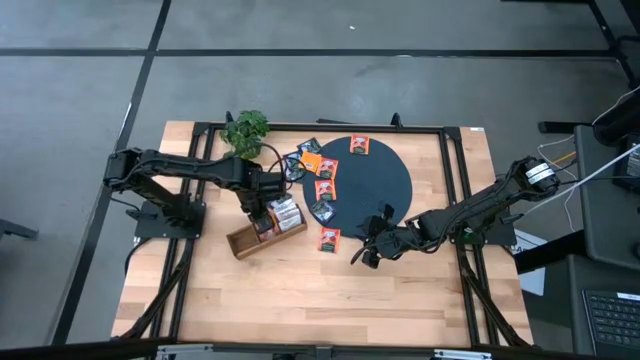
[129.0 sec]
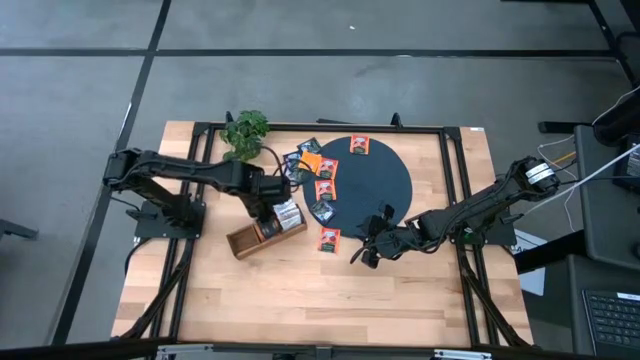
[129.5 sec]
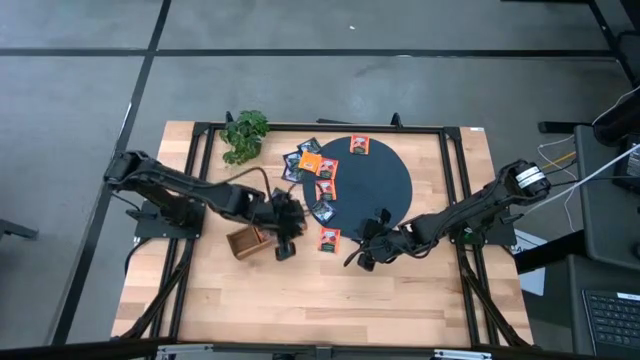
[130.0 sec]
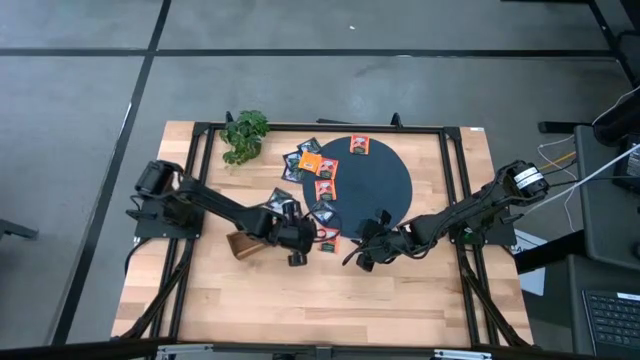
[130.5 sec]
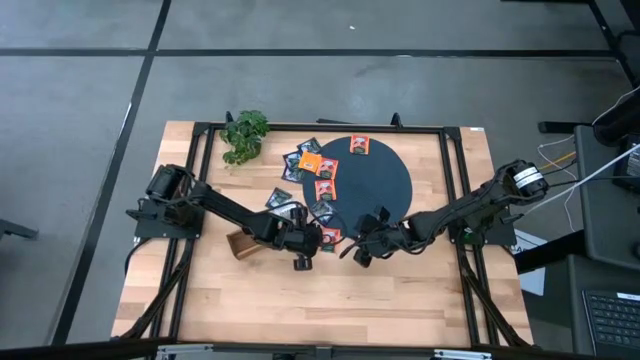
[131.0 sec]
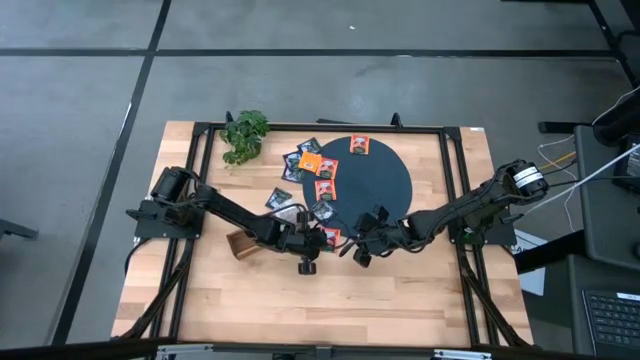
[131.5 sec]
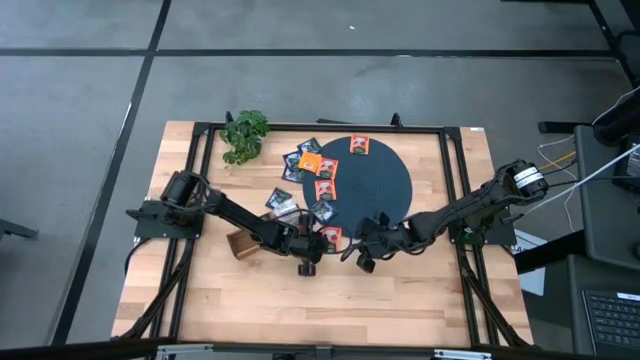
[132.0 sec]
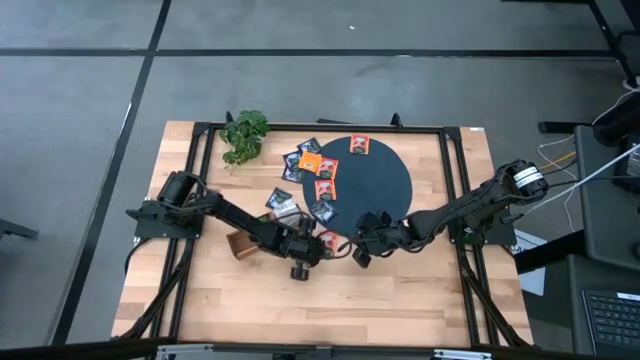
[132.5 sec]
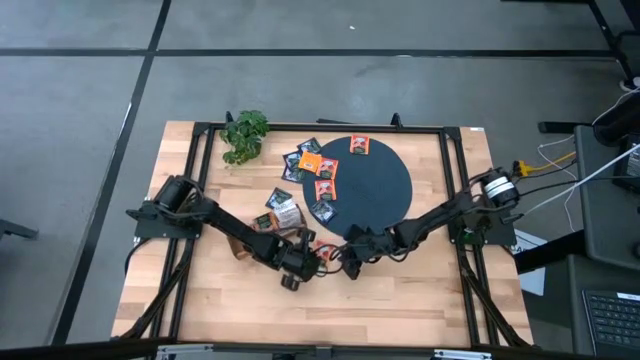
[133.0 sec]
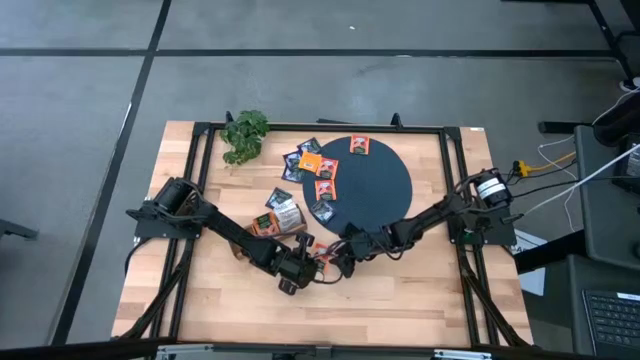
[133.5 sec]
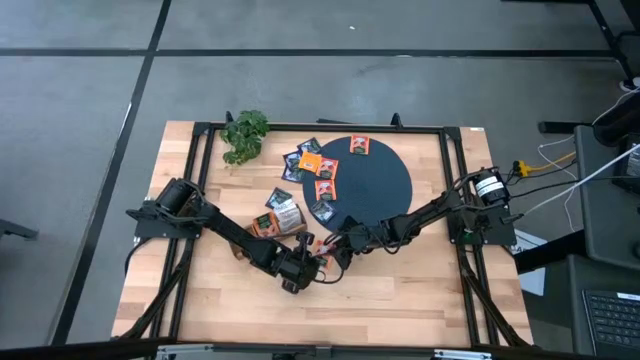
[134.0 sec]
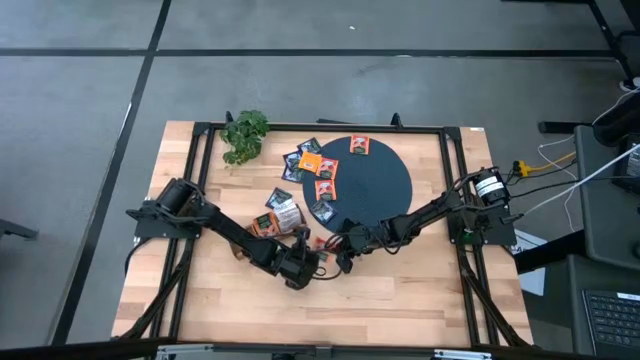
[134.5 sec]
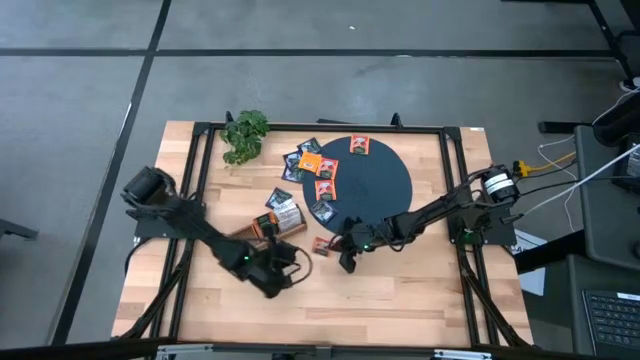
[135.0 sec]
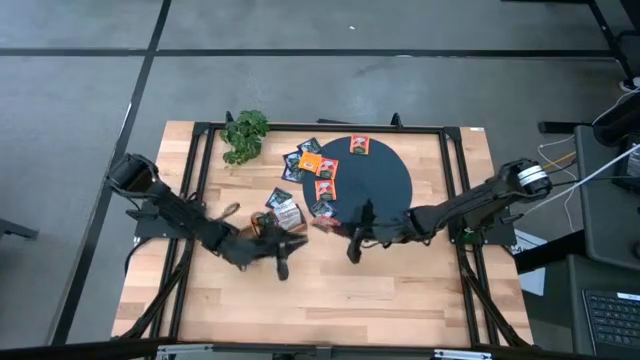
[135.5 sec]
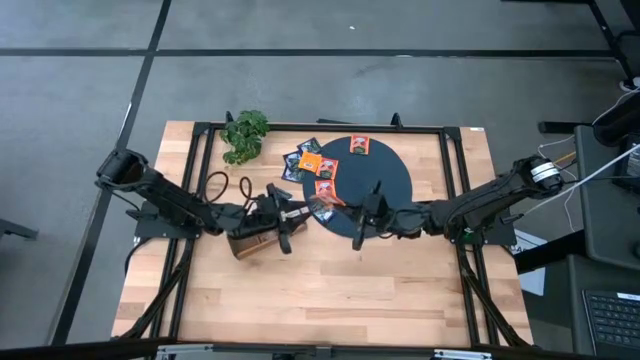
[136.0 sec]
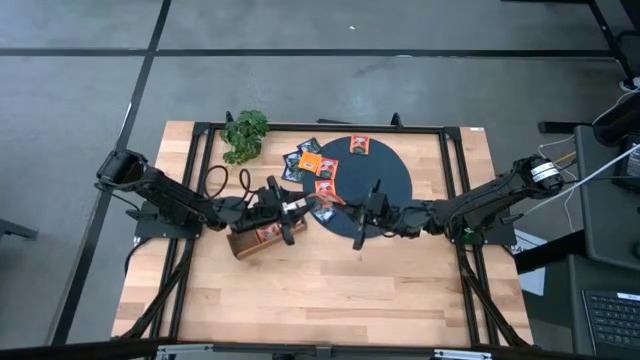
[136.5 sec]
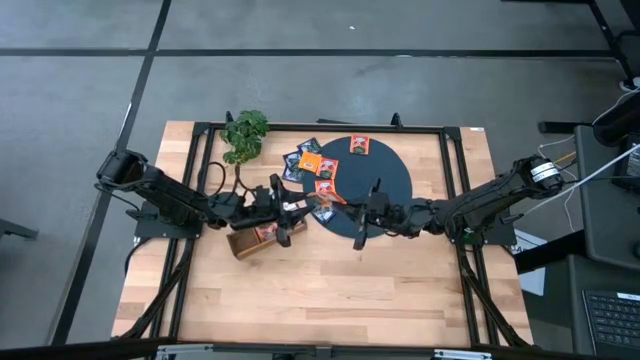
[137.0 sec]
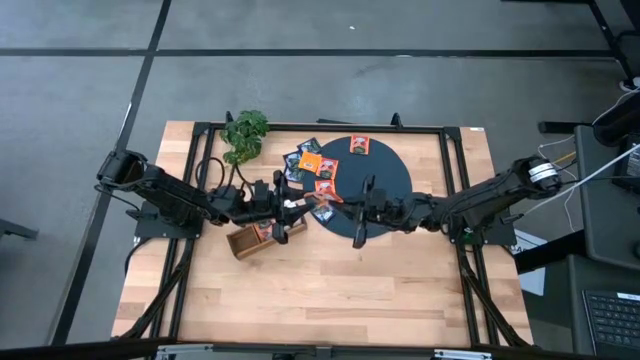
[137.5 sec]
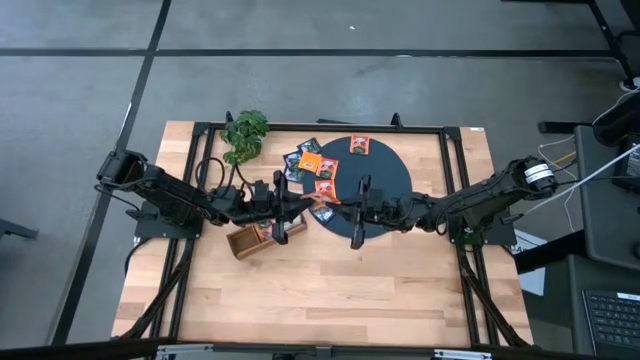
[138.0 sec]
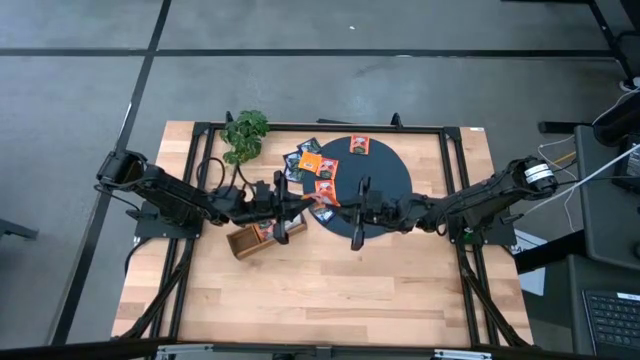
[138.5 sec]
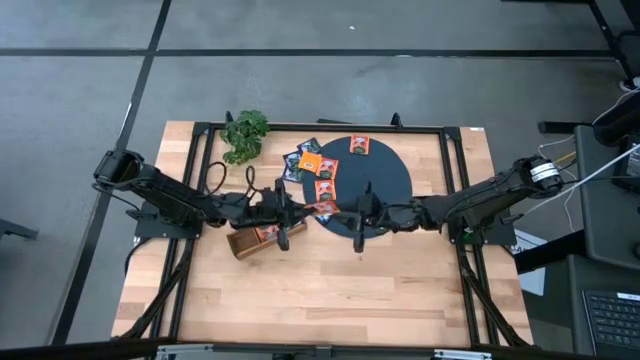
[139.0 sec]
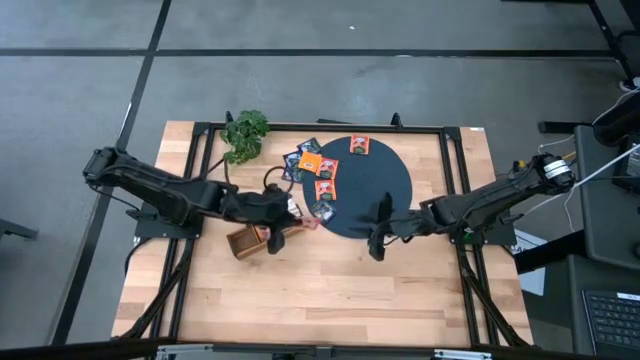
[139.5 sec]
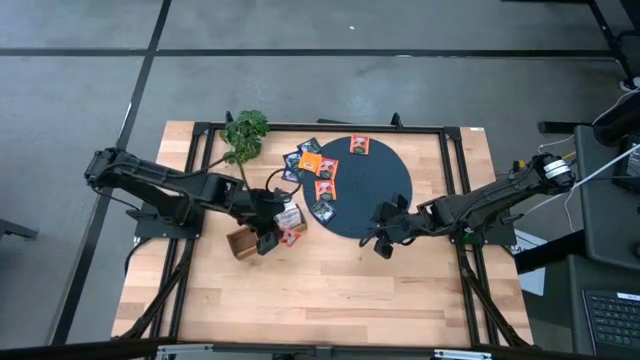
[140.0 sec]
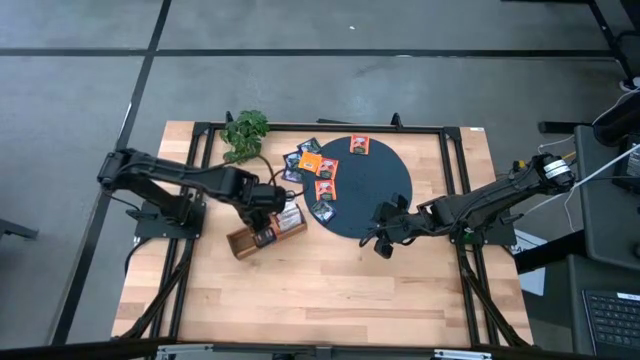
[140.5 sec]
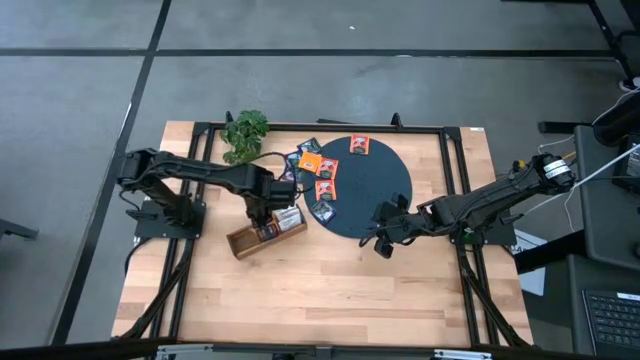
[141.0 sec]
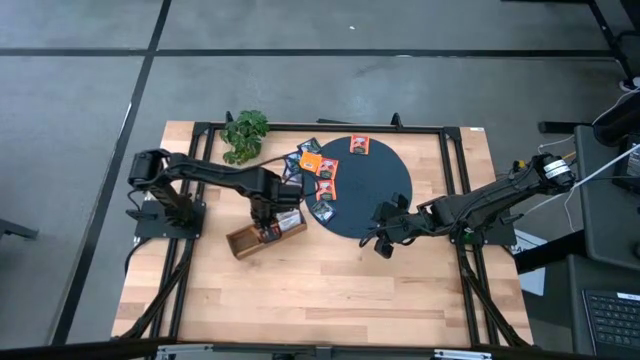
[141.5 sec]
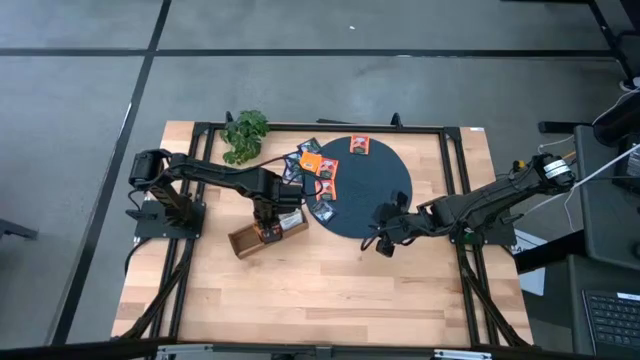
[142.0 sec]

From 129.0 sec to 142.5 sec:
Task: Pick & Place Tea
Put the orange tea bag into the middle section of the wooden organizer

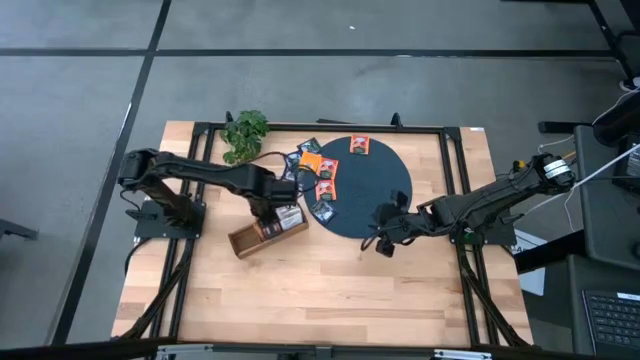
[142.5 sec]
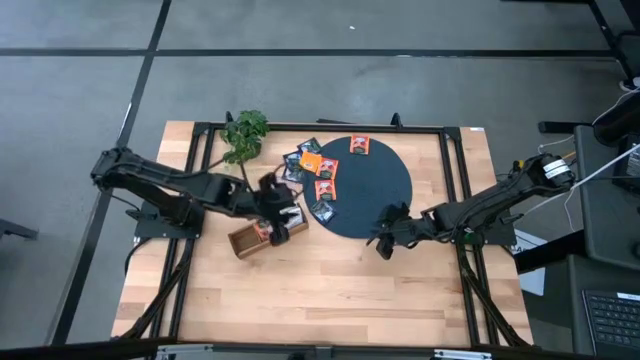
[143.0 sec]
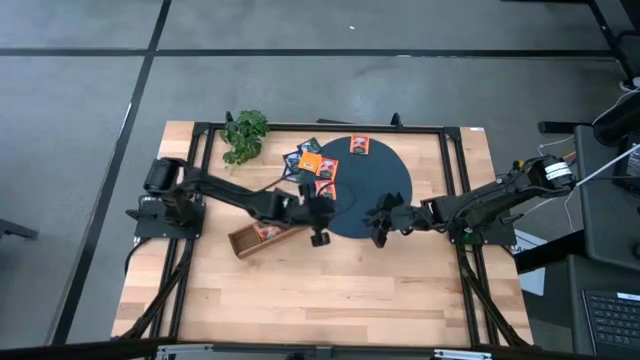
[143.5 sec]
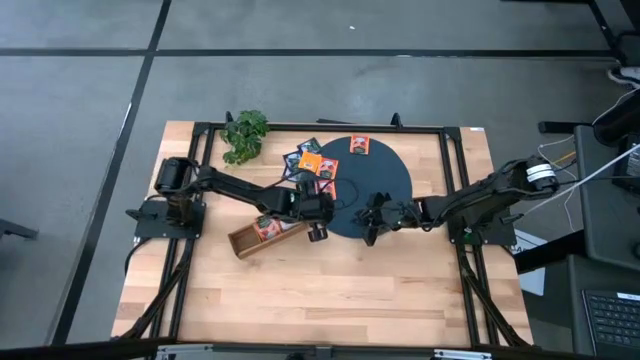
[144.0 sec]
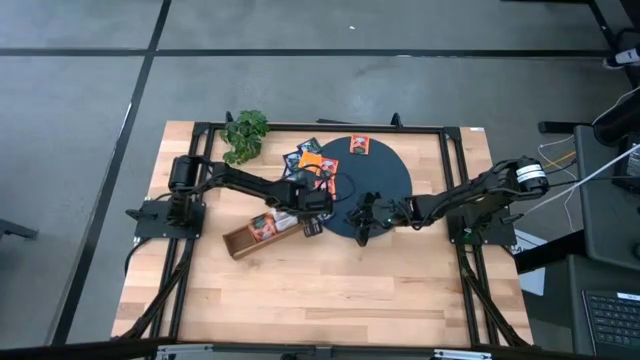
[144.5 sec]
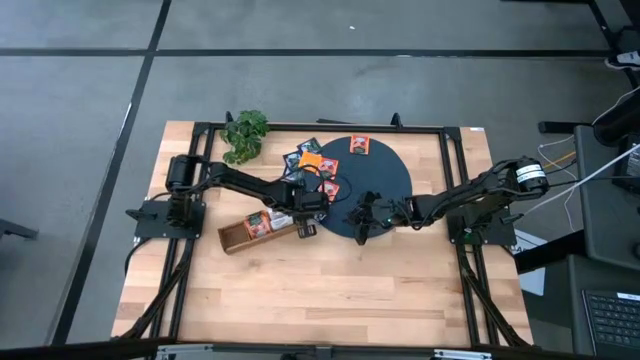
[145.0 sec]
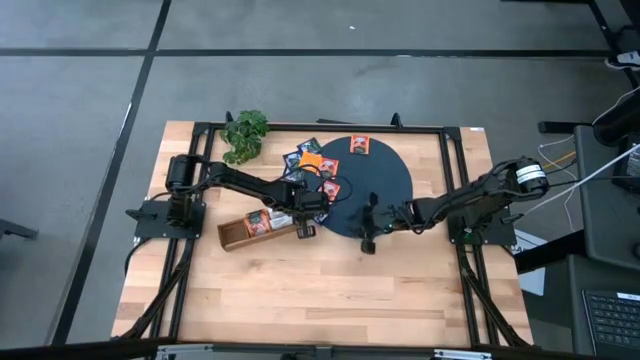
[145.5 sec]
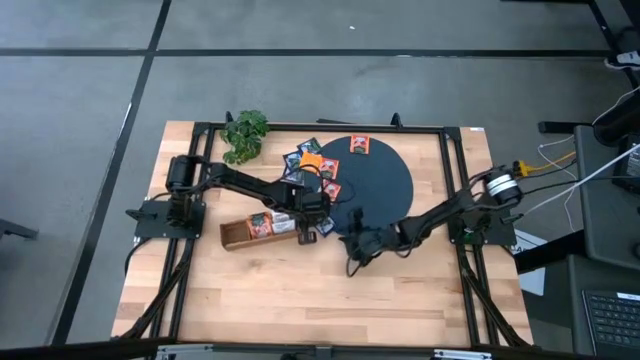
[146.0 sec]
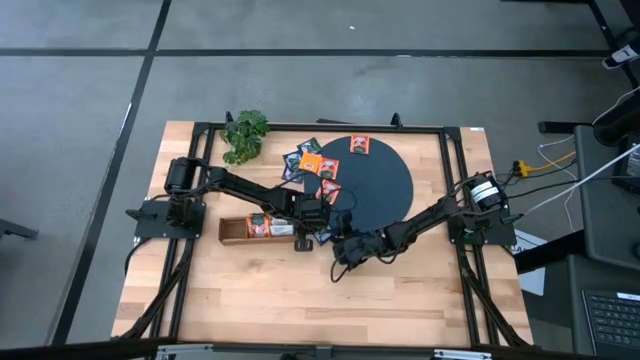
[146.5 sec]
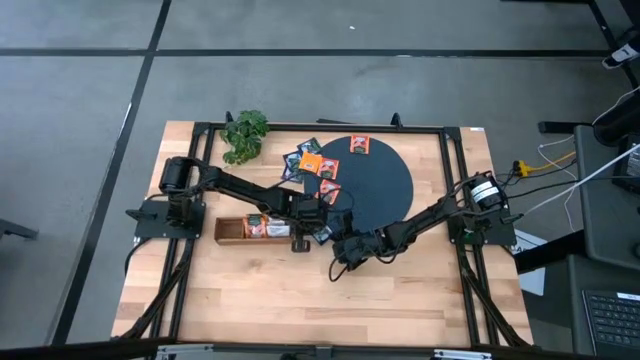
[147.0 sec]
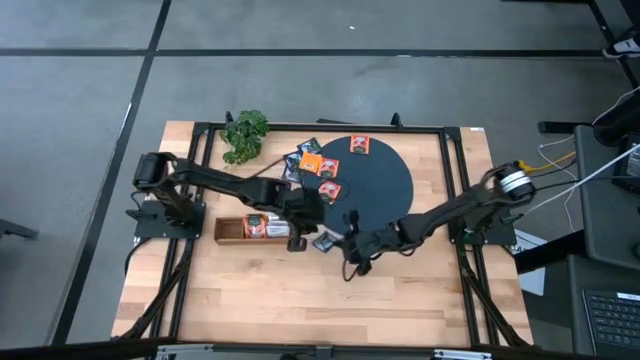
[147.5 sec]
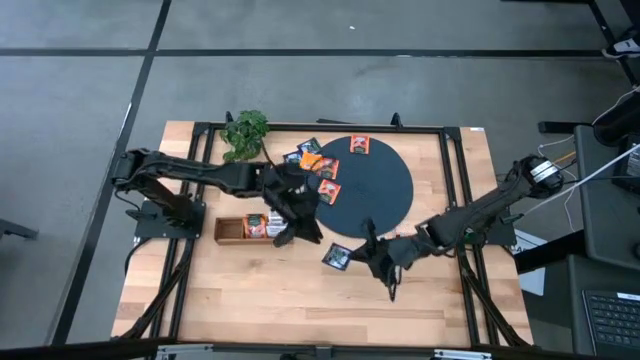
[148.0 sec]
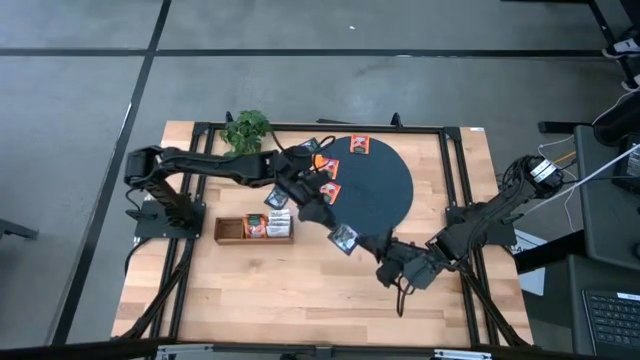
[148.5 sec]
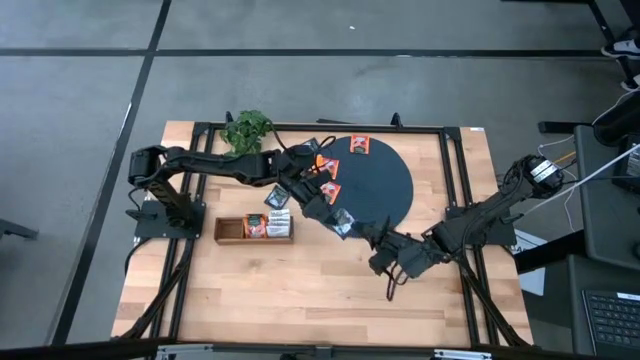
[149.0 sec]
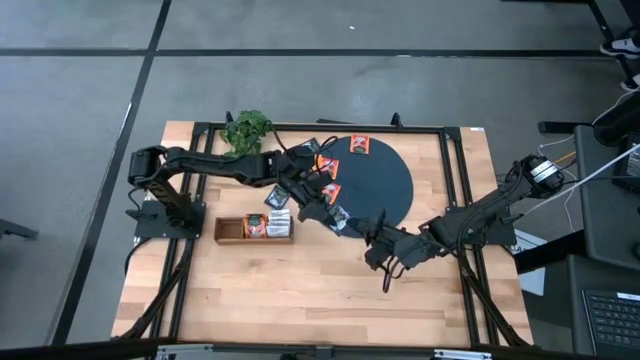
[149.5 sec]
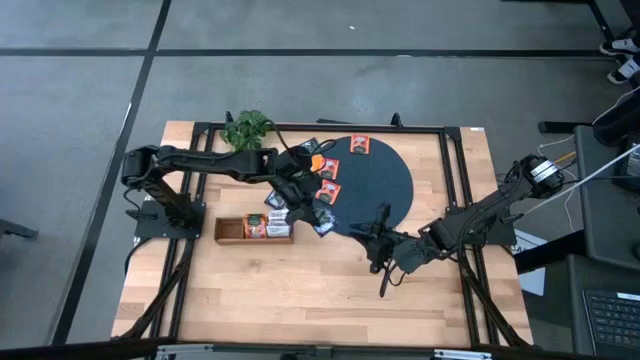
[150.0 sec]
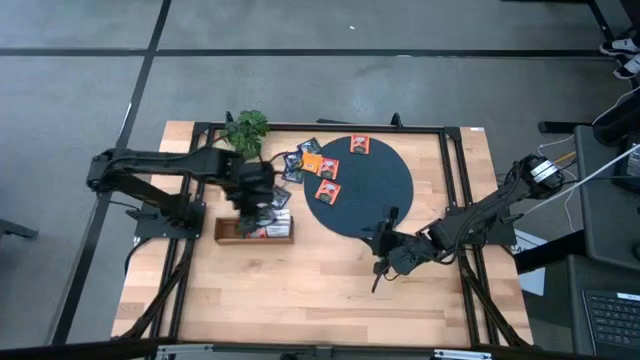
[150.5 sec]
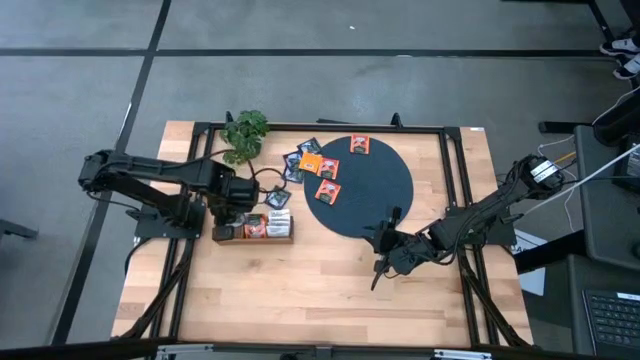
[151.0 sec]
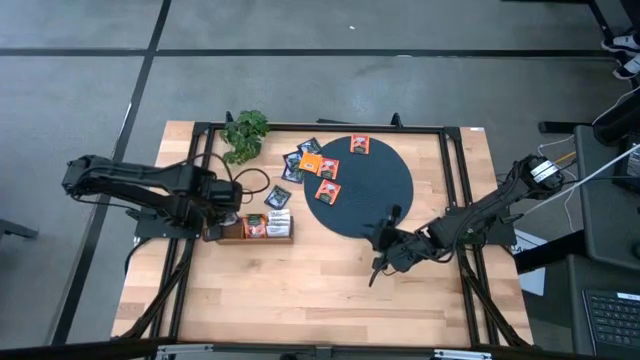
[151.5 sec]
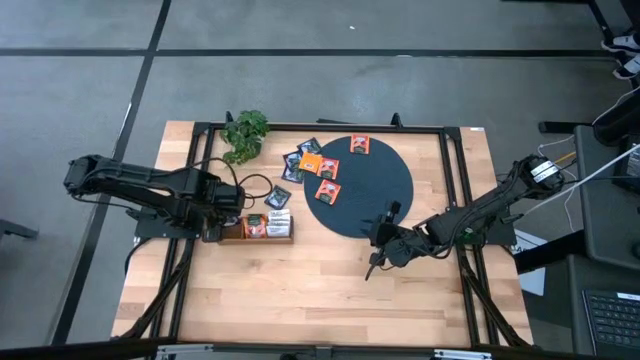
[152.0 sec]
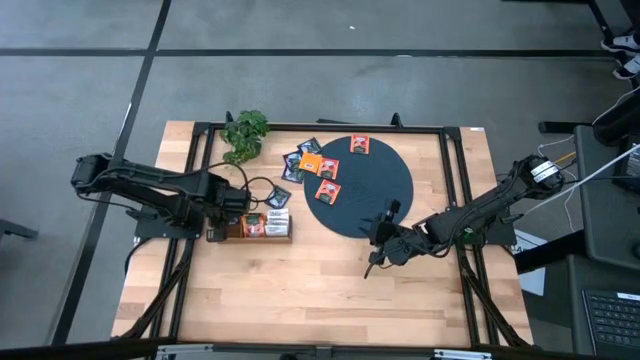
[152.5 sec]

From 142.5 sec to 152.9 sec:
Put the purple tea bag into the left section of the wooden organizer
